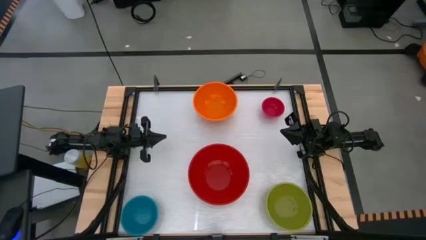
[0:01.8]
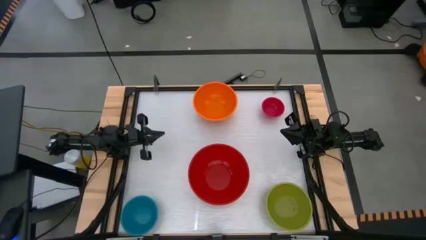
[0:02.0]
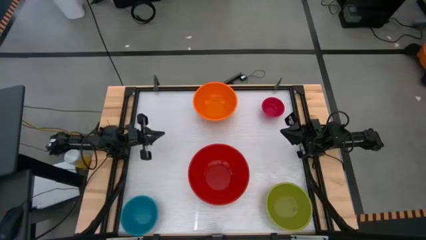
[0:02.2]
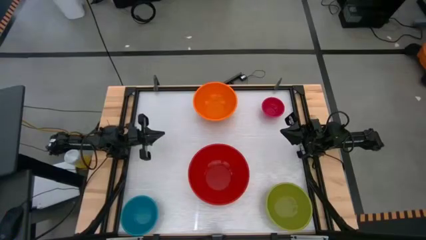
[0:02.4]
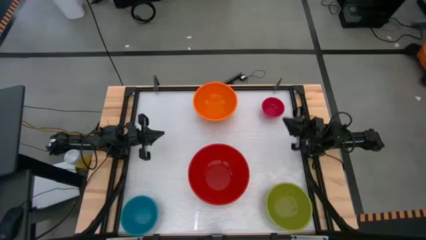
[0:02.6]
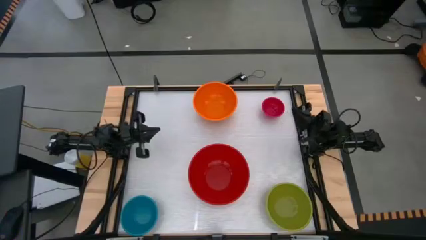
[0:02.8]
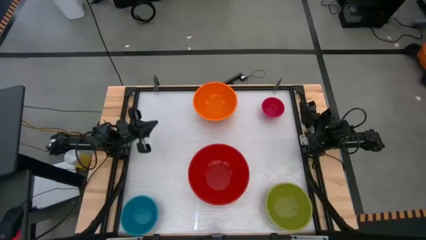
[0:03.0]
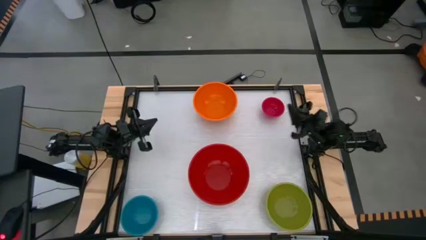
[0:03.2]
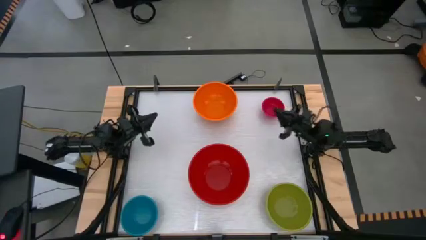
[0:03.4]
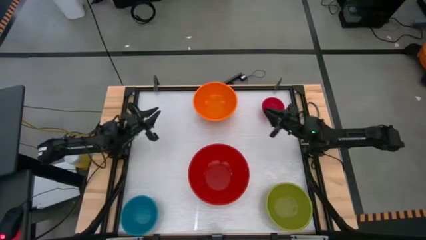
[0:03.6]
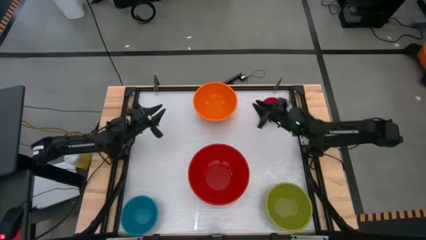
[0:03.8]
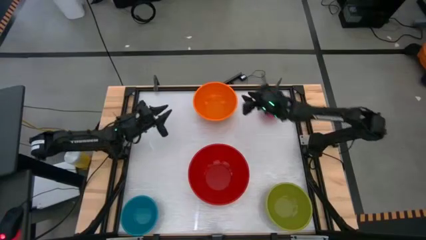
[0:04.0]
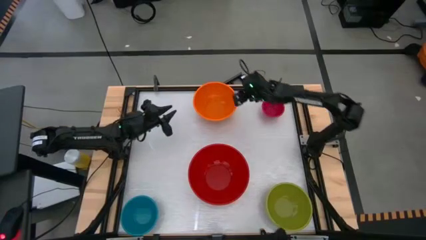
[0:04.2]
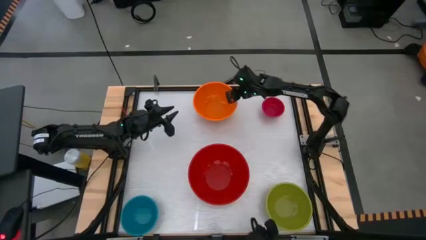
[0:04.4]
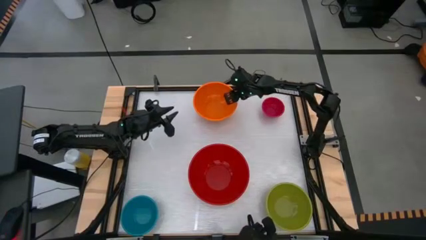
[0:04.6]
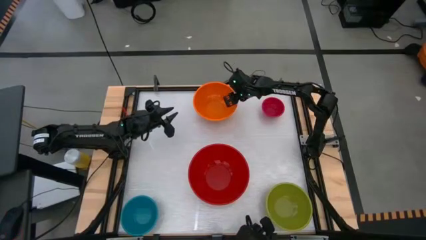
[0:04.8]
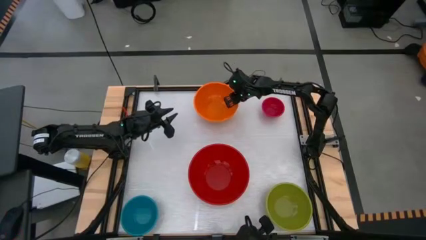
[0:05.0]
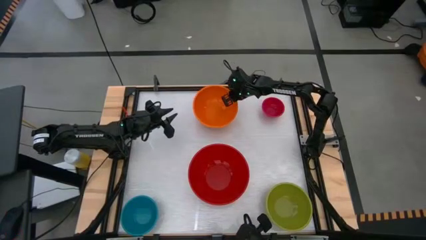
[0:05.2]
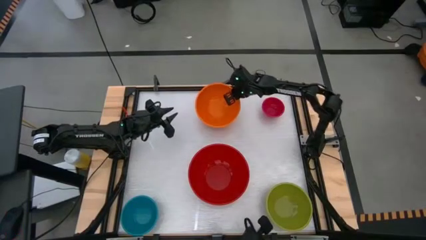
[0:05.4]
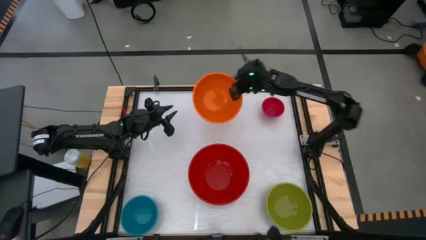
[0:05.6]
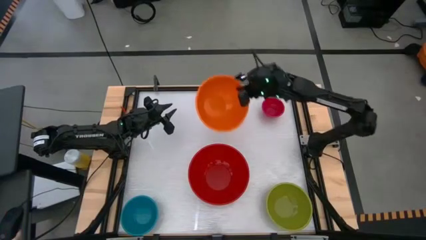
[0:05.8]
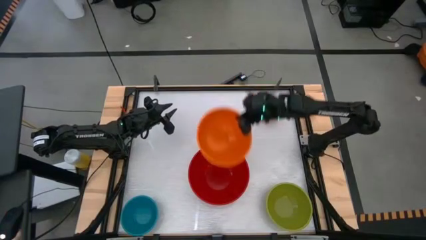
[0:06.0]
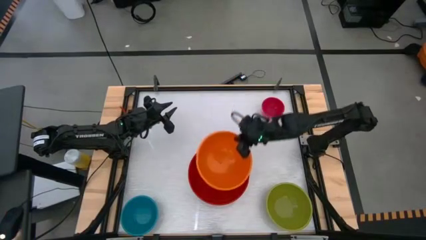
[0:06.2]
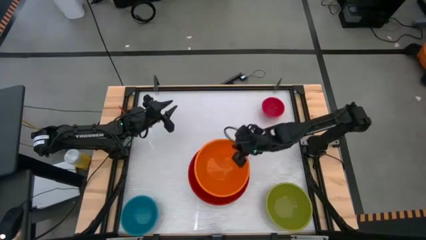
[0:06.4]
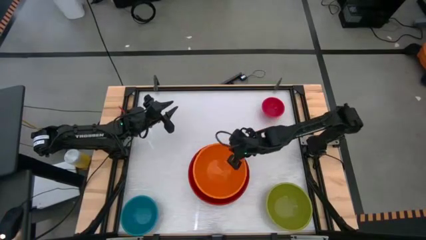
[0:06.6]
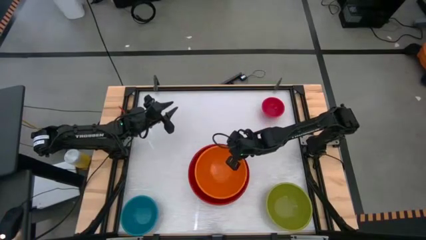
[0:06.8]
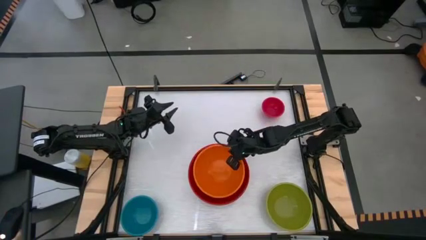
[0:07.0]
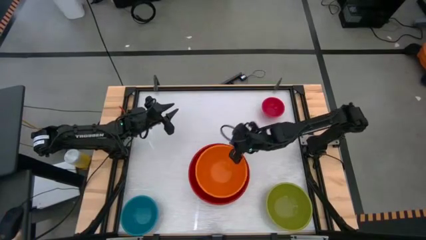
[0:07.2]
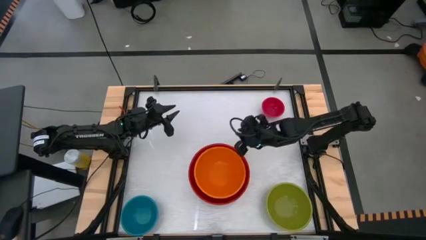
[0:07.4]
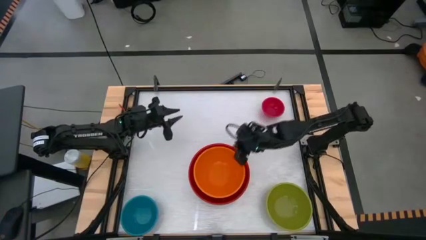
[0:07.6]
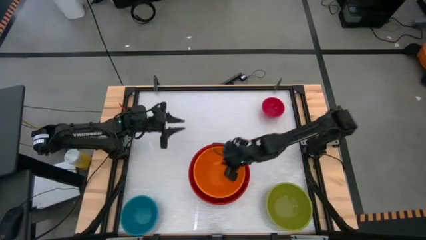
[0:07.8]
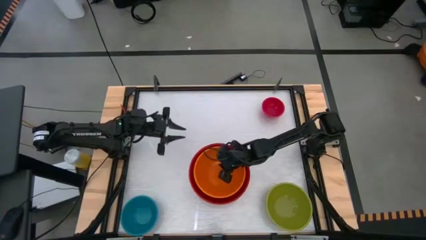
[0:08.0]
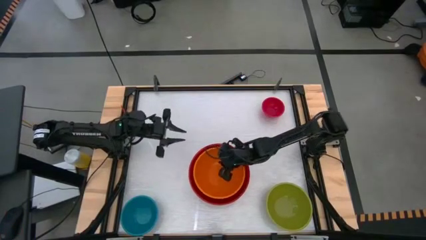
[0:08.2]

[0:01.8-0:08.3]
Stack the orange bowl on top of the red bowl

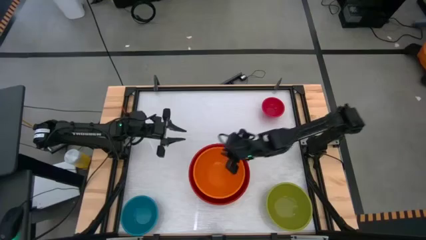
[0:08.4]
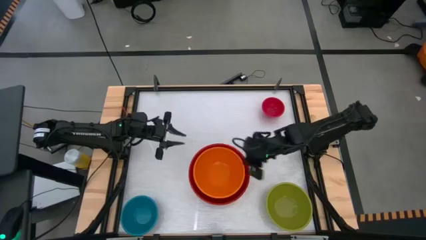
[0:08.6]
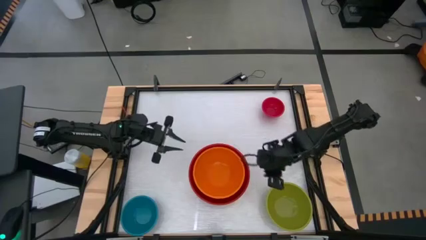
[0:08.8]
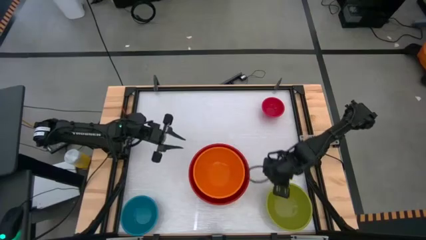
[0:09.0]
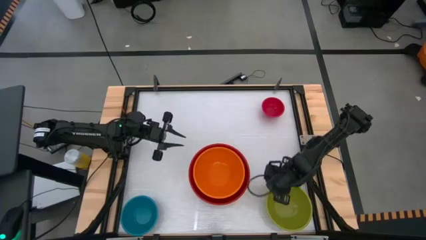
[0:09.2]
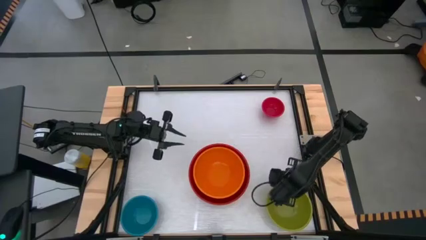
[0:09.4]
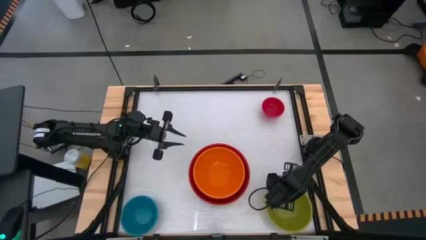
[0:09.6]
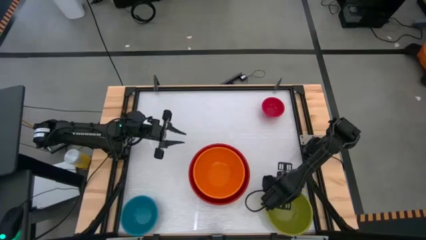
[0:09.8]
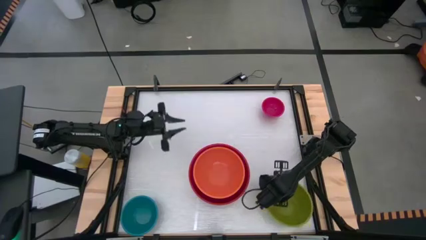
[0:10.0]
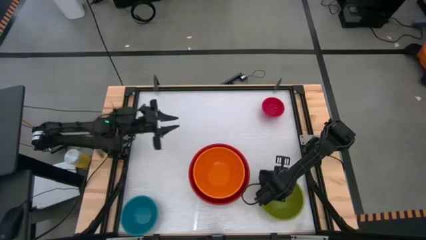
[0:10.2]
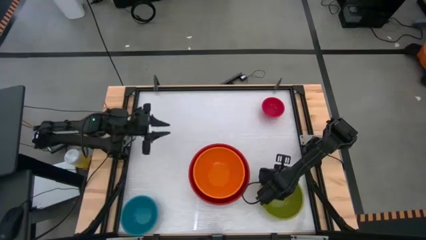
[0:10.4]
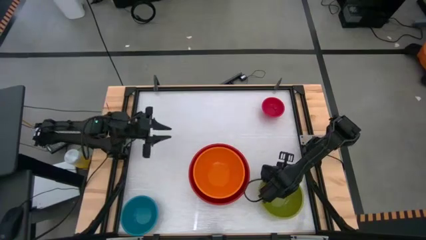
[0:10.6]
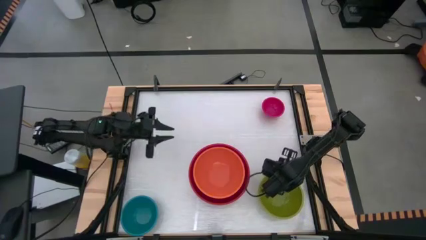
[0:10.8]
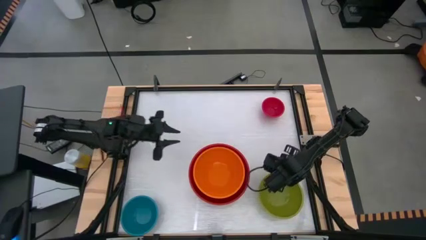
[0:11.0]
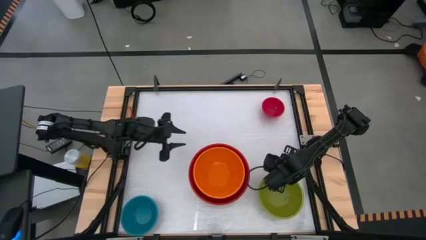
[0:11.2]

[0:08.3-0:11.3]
Stack the green bowl on top of the orange bowl

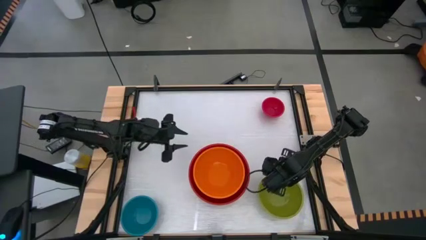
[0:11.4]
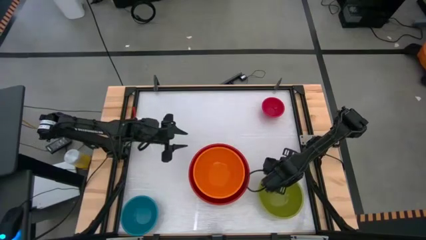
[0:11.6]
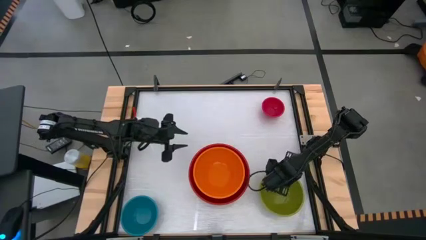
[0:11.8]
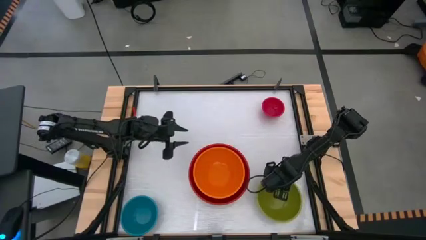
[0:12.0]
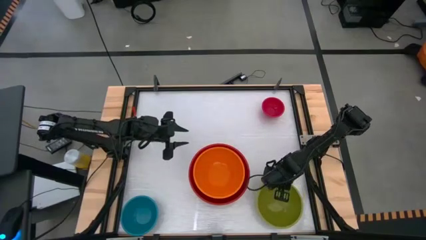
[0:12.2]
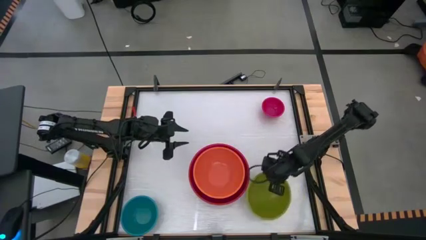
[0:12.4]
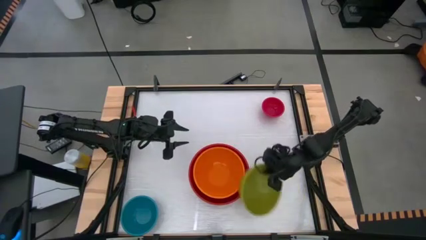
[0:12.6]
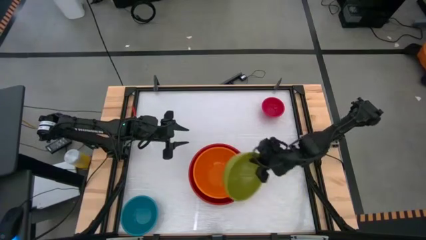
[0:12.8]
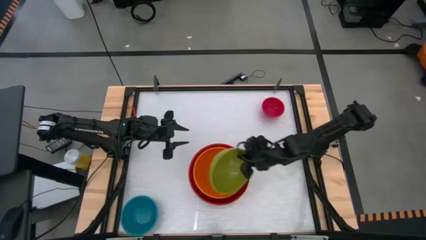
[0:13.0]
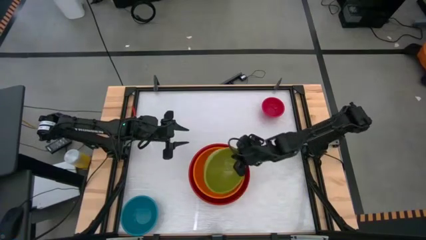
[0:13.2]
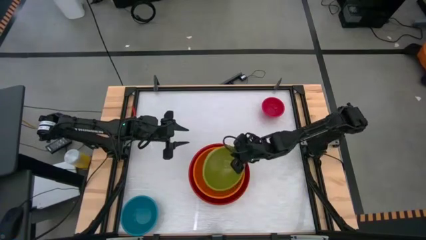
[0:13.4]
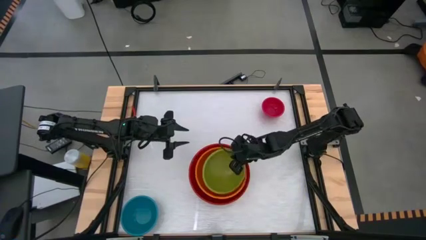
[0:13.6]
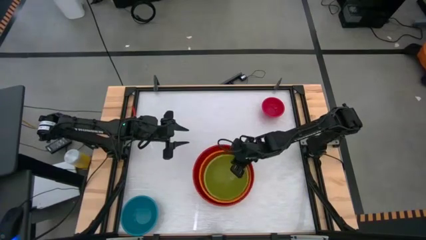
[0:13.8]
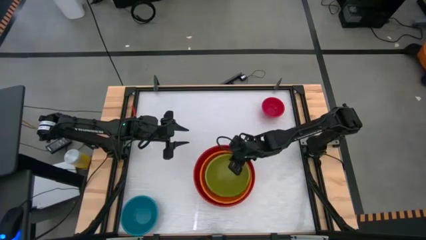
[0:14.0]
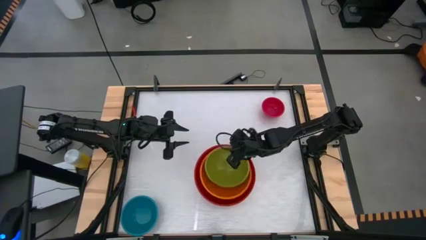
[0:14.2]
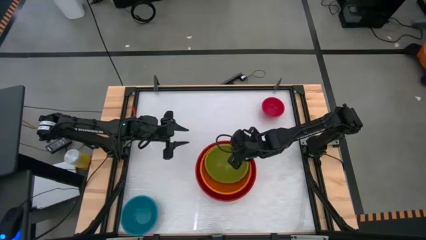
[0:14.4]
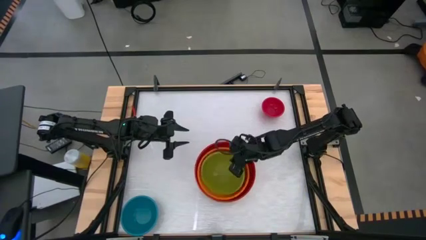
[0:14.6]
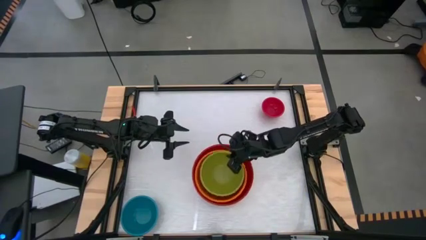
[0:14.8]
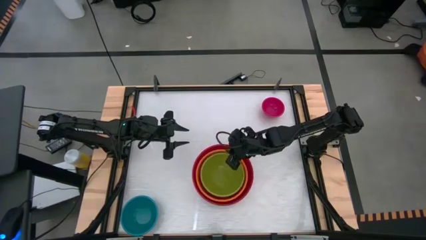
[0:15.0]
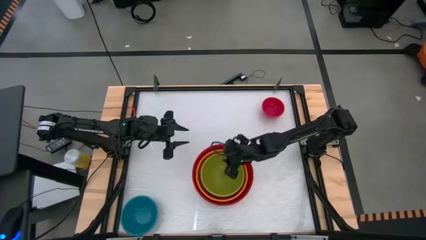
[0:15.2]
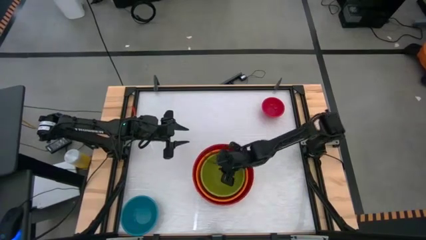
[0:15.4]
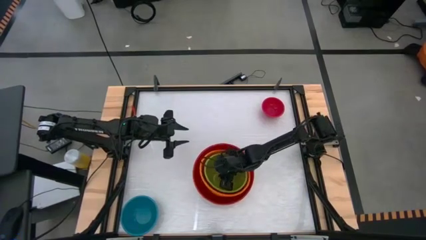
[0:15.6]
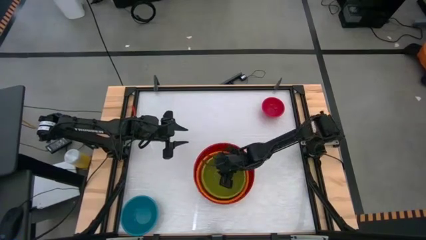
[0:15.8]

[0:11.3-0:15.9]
Stack the green bowl on top of the orange bowl
